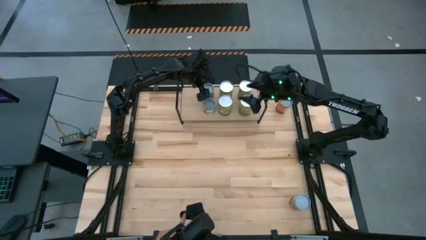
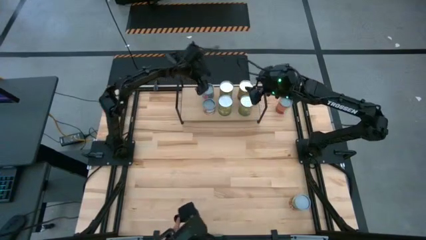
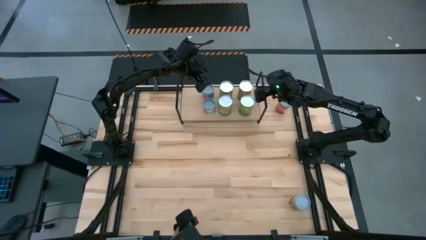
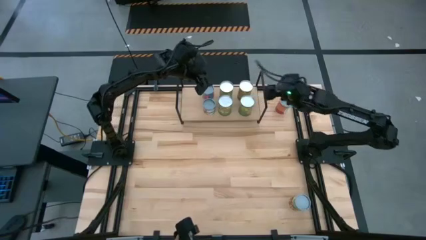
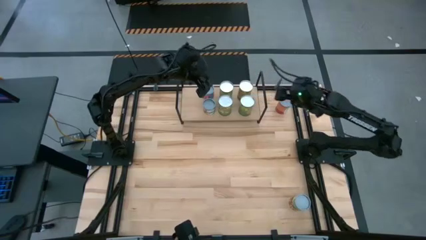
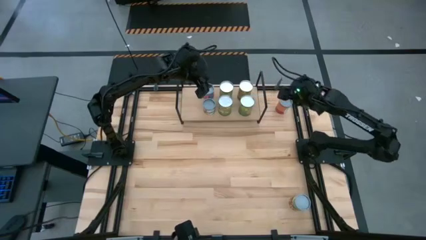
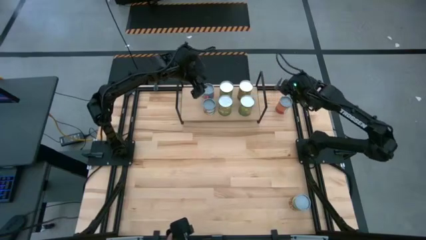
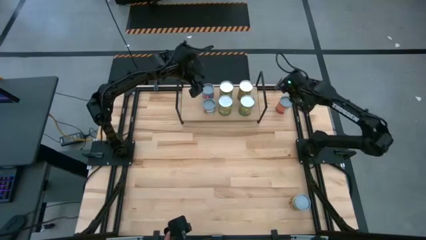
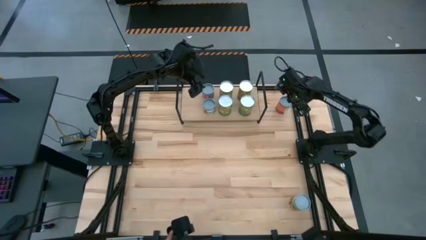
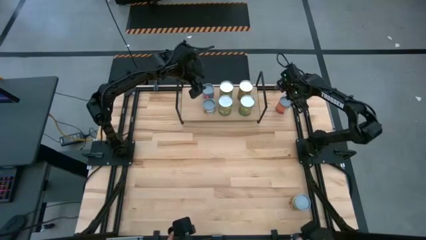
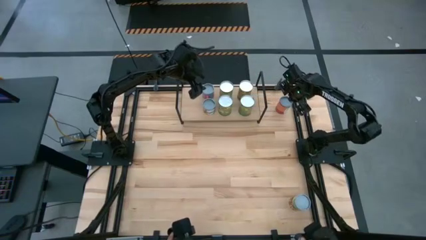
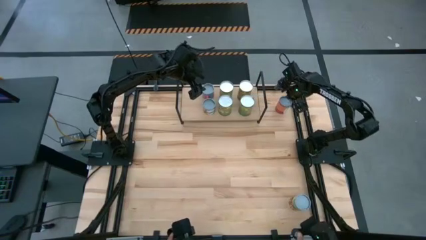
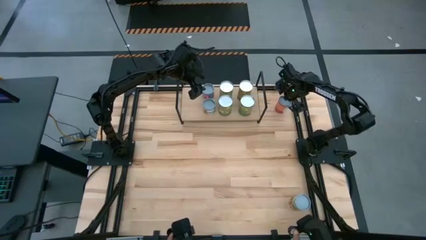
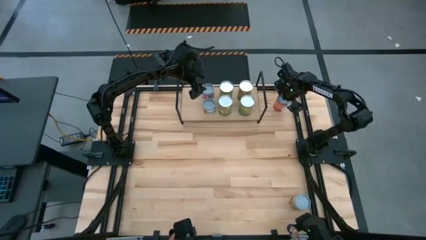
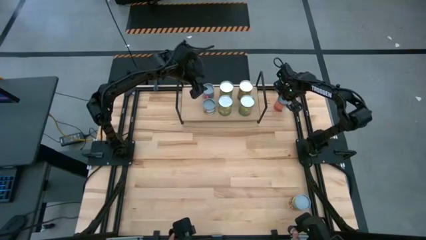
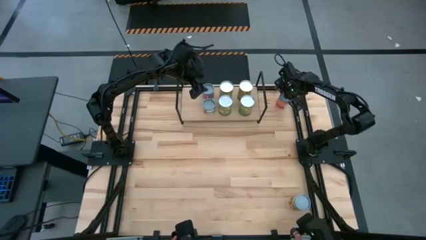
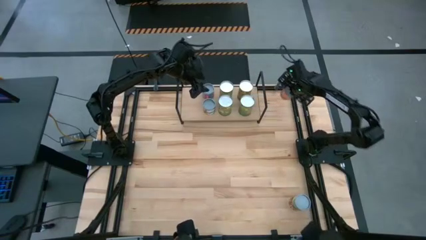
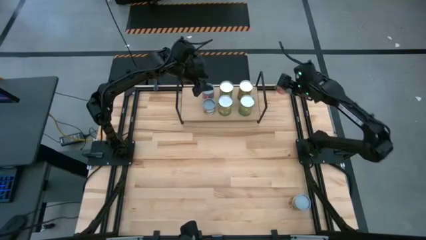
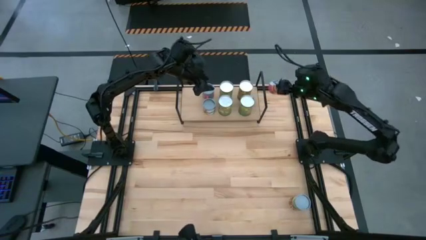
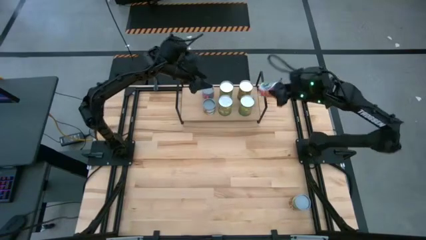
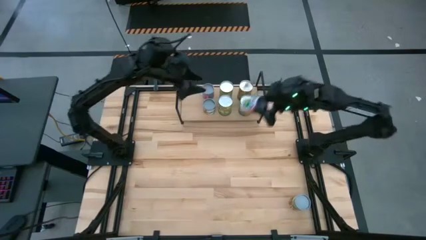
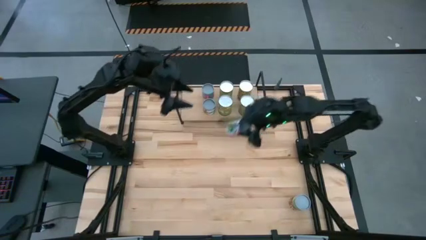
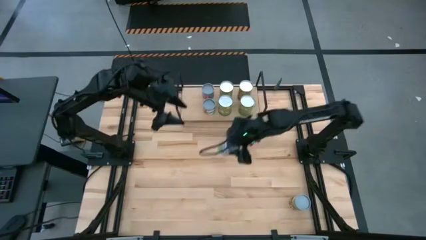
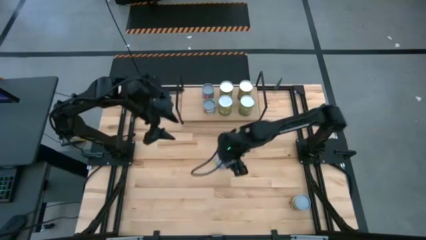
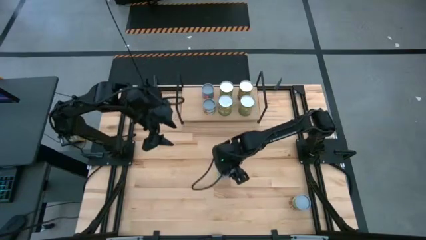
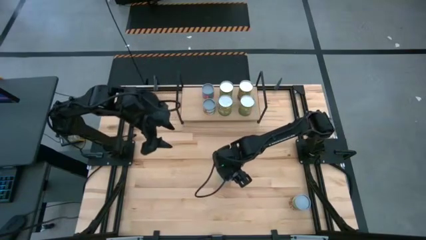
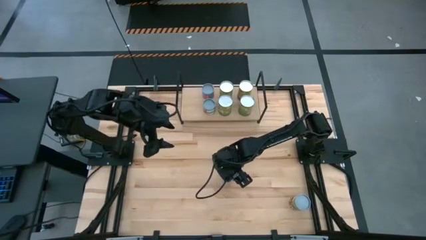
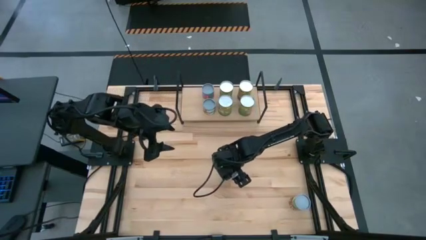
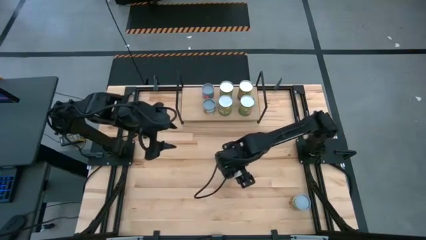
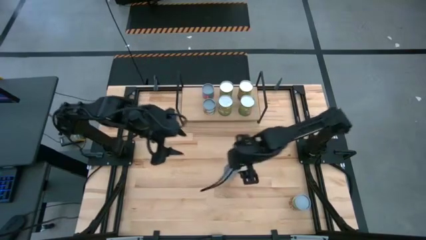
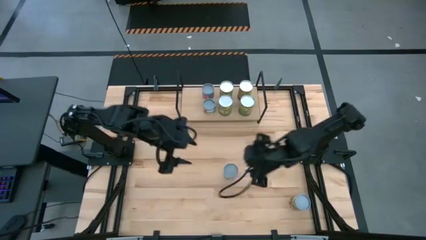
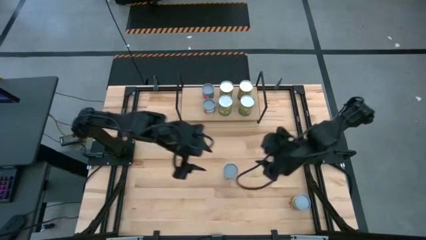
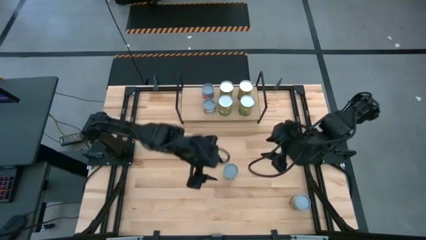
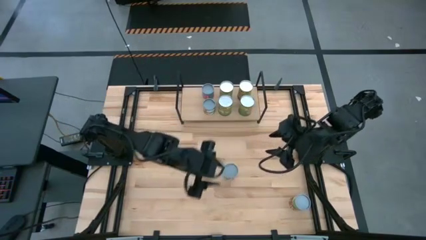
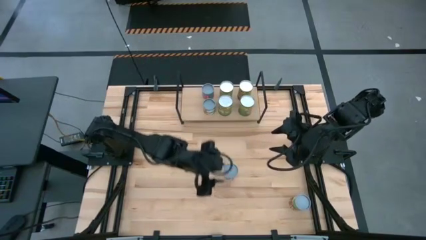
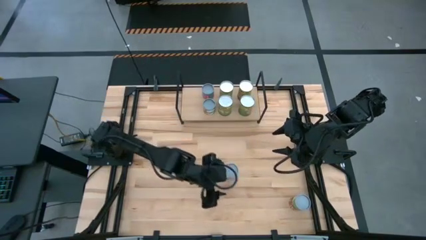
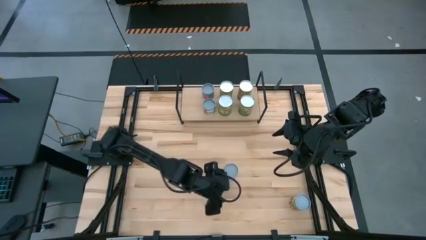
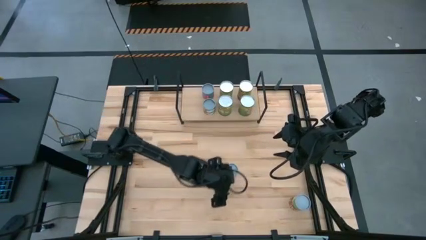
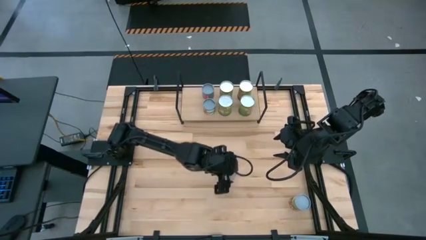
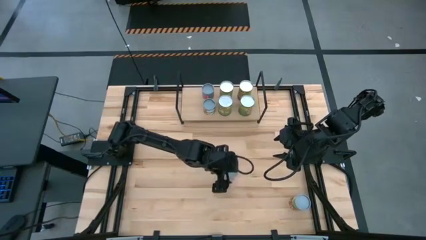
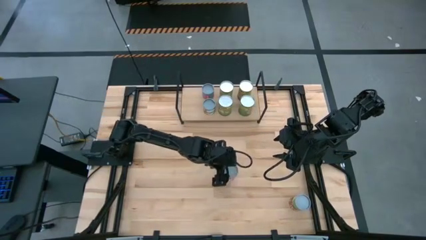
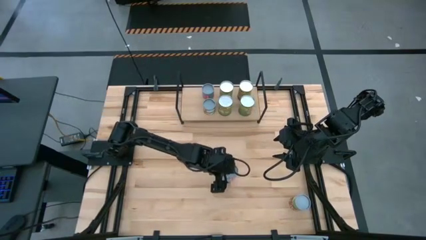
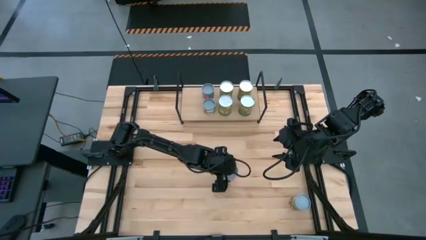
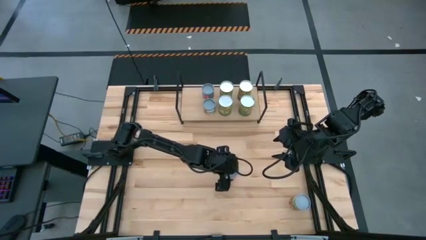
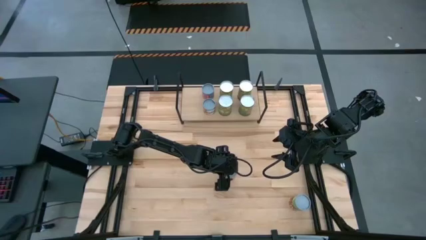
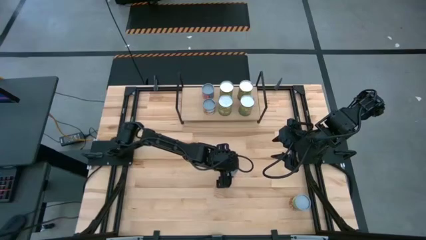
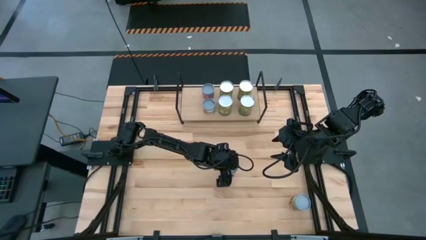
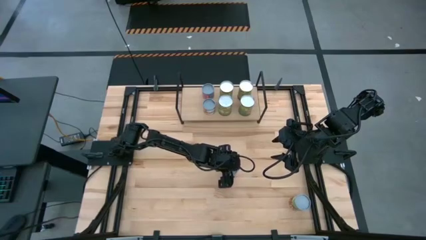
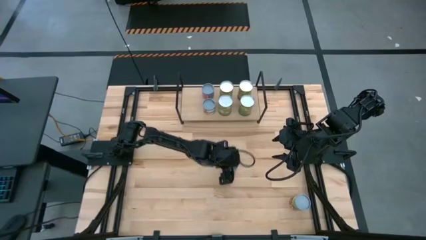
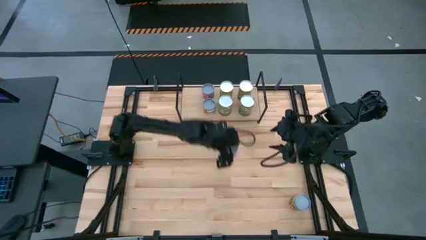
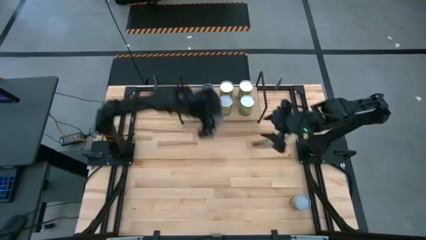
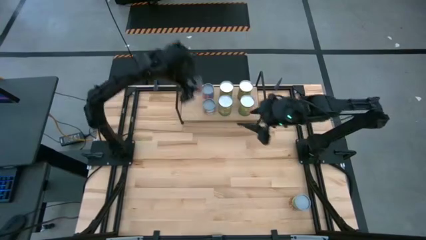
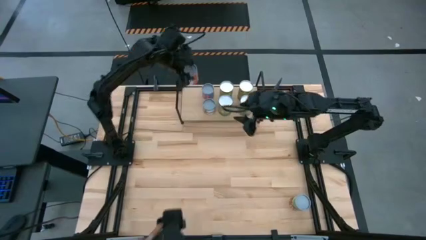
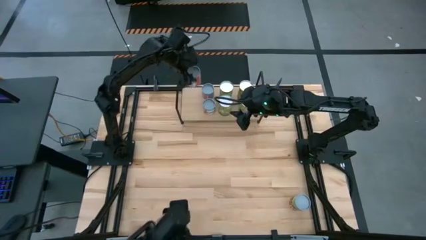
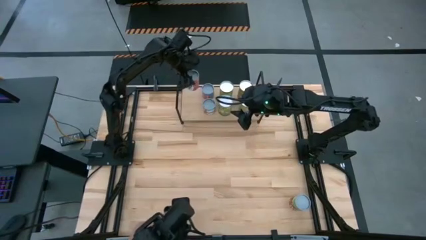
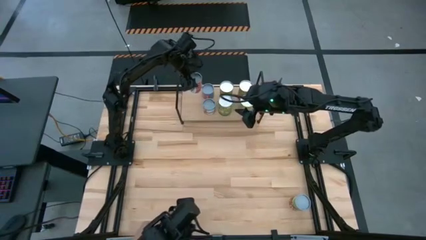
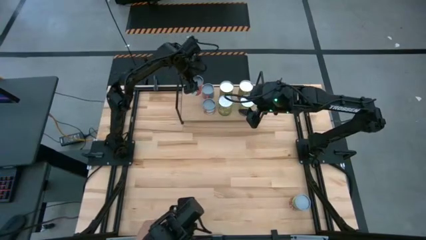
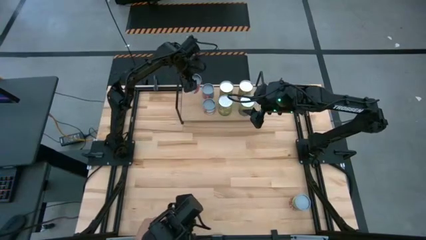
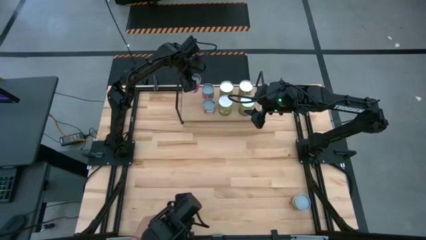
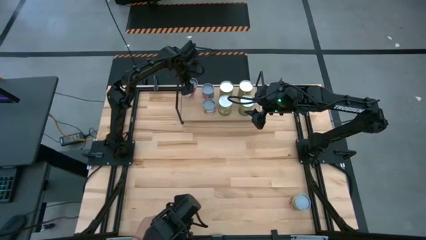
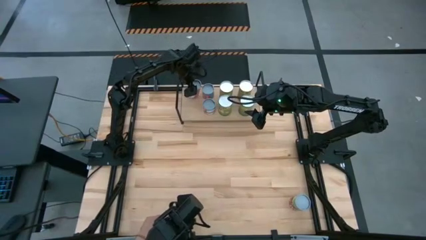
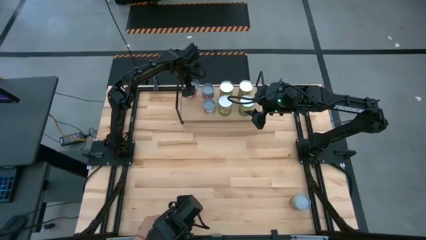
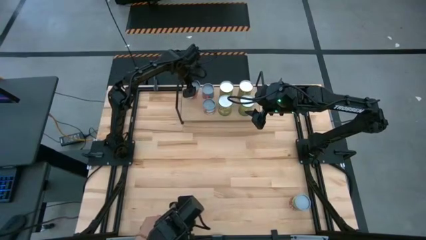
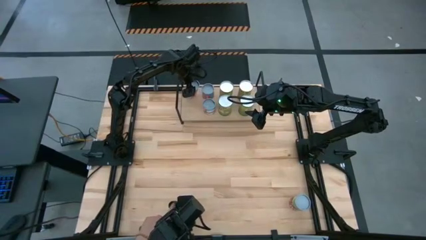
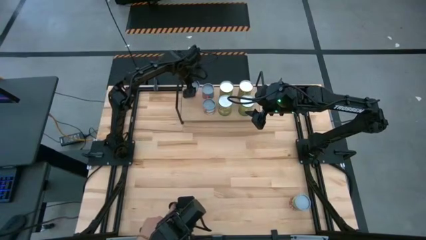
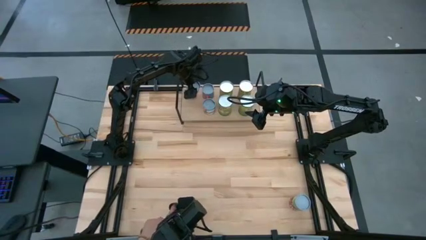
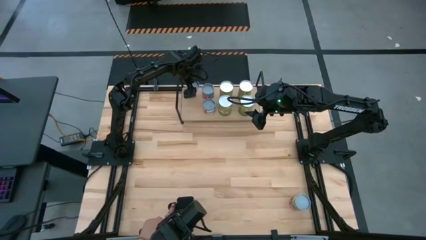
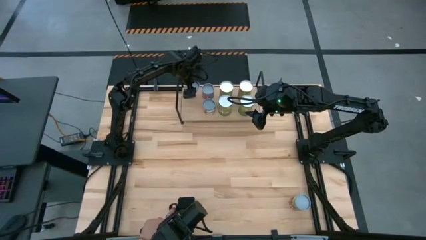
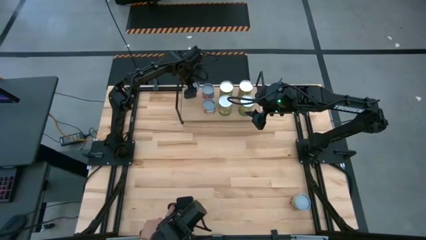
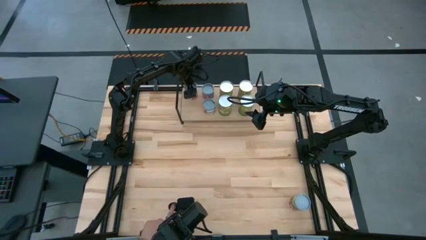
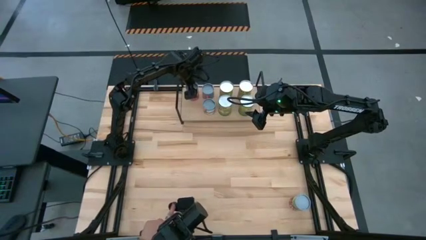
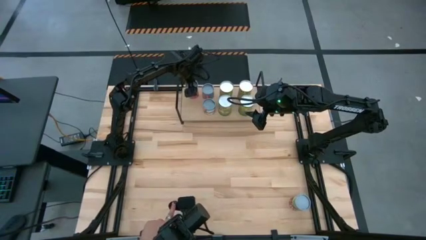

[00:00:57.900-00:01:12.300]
Task: Pick and place cans onto a shelf
Put the canned mixed fruits on the shelf
